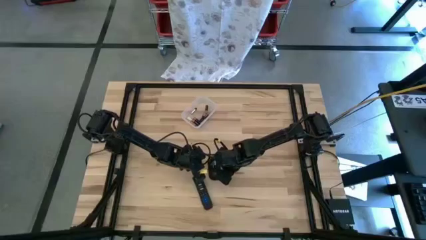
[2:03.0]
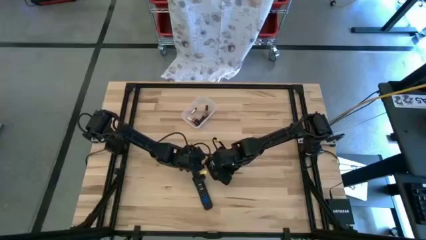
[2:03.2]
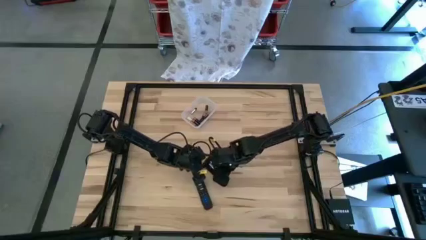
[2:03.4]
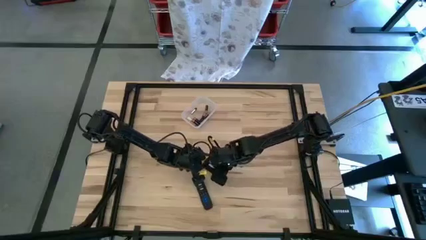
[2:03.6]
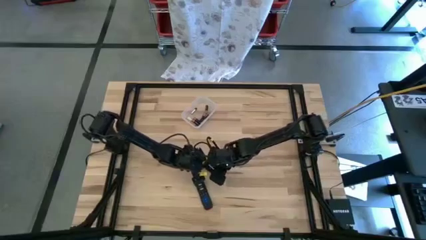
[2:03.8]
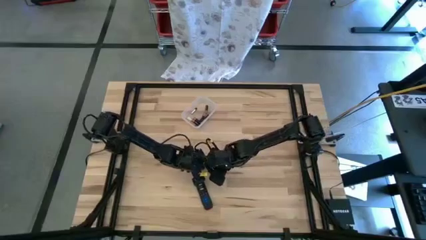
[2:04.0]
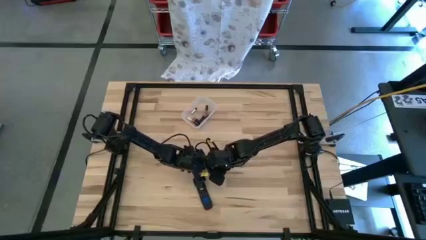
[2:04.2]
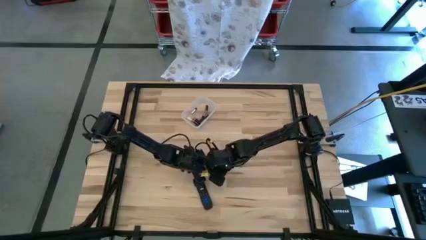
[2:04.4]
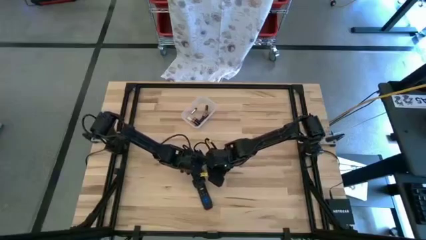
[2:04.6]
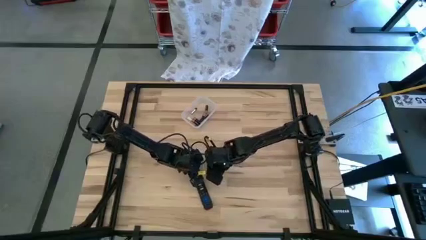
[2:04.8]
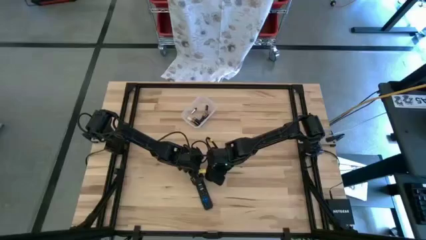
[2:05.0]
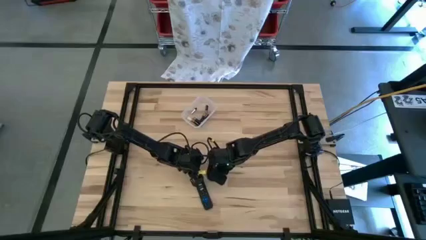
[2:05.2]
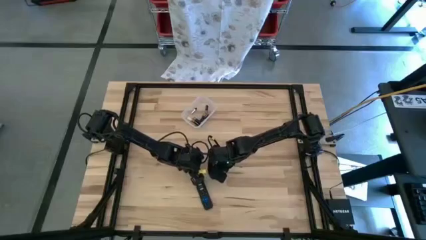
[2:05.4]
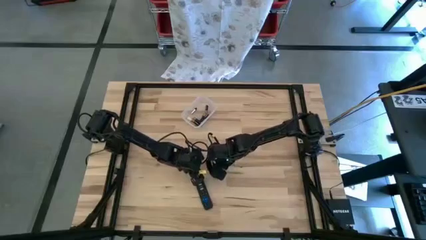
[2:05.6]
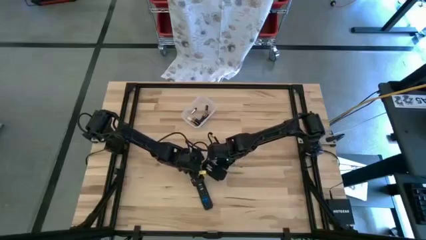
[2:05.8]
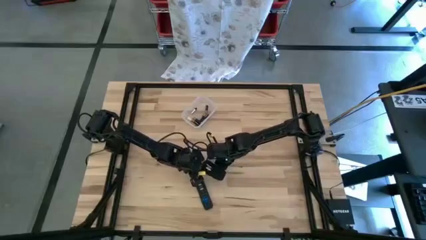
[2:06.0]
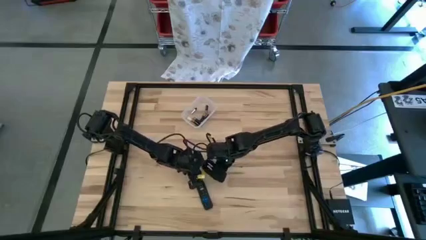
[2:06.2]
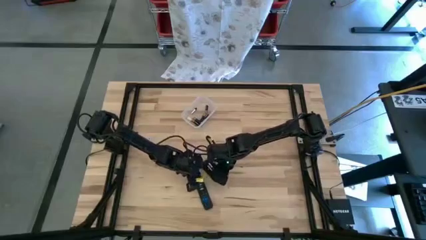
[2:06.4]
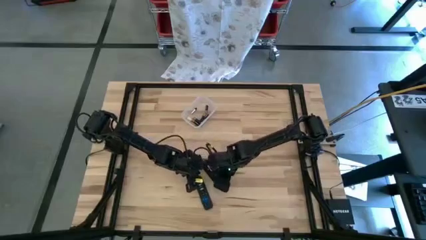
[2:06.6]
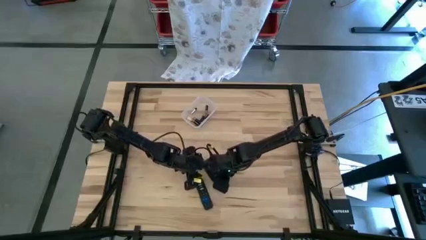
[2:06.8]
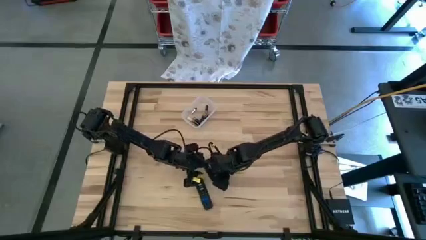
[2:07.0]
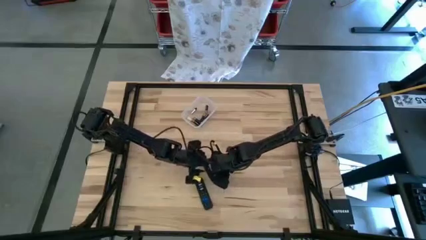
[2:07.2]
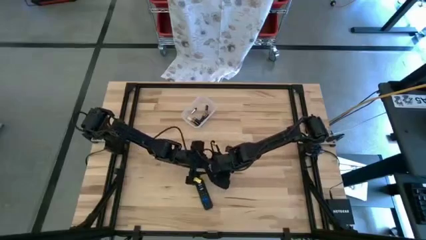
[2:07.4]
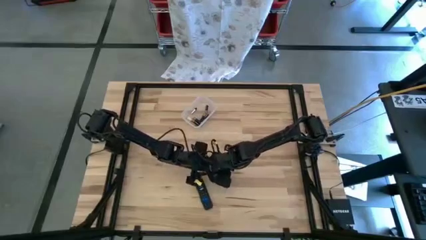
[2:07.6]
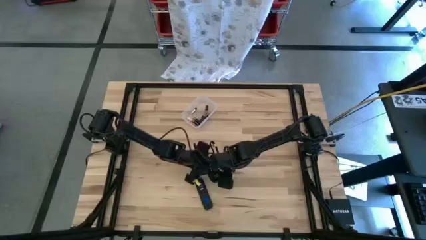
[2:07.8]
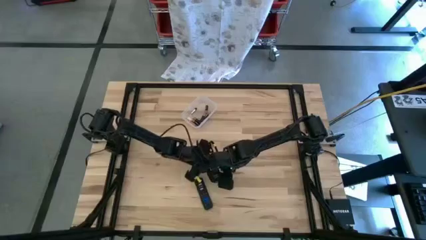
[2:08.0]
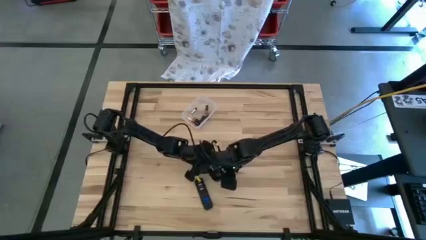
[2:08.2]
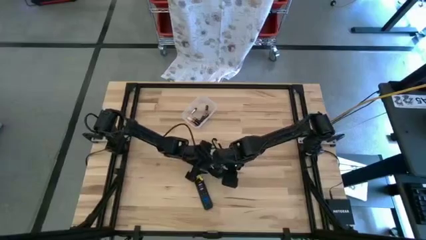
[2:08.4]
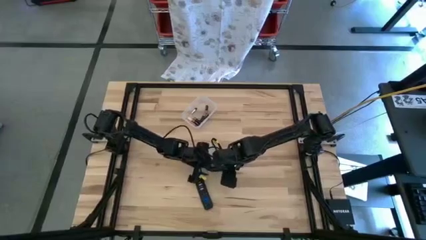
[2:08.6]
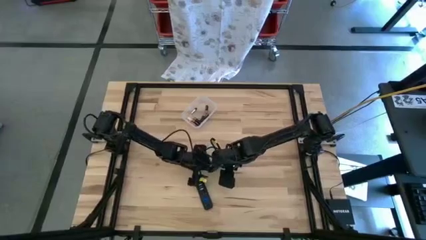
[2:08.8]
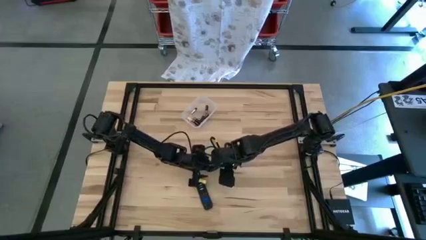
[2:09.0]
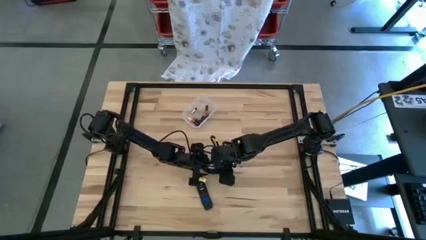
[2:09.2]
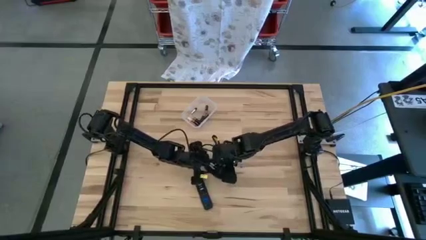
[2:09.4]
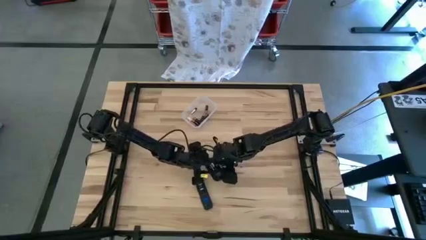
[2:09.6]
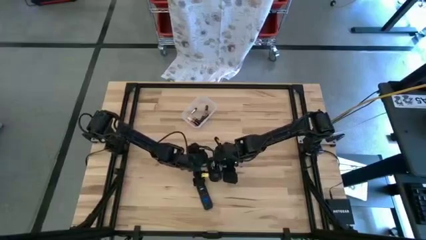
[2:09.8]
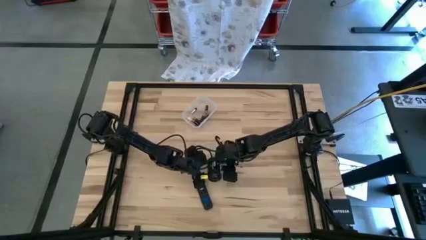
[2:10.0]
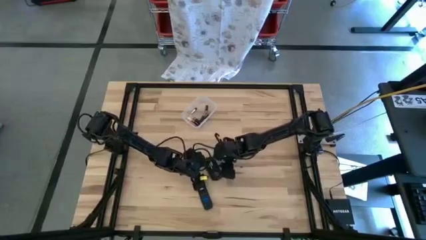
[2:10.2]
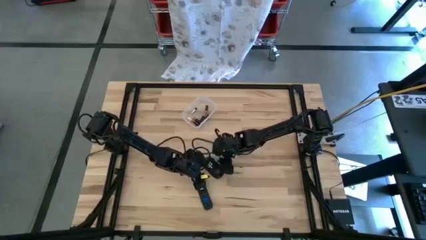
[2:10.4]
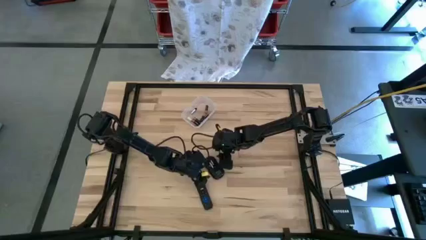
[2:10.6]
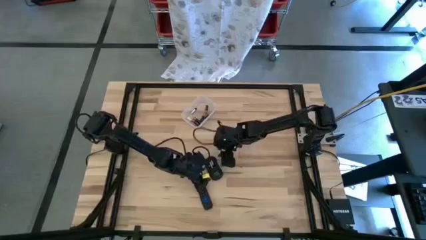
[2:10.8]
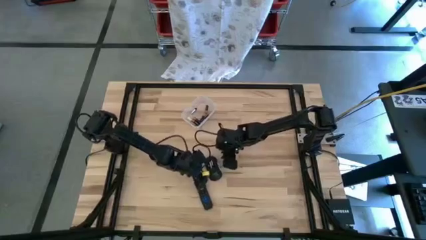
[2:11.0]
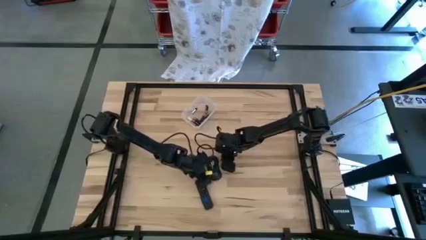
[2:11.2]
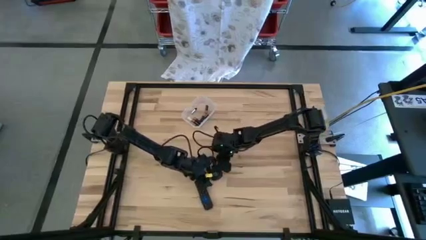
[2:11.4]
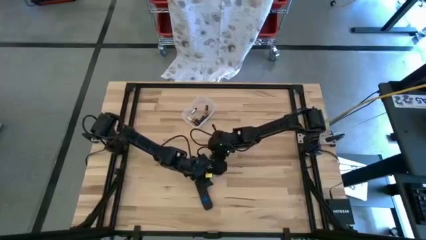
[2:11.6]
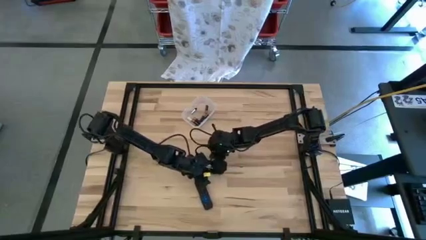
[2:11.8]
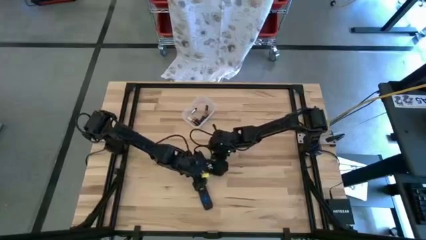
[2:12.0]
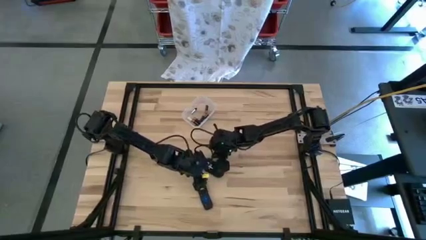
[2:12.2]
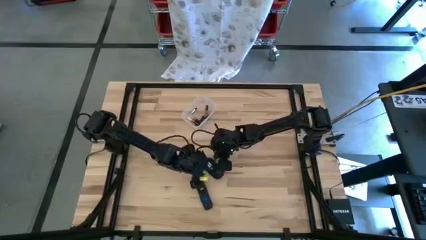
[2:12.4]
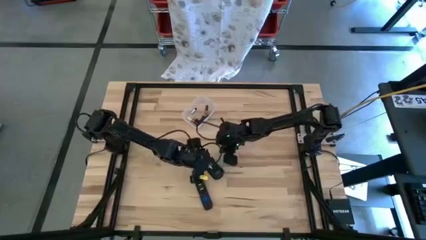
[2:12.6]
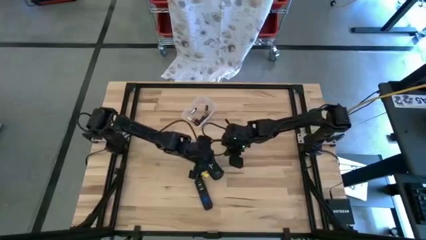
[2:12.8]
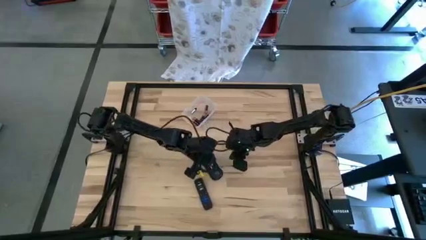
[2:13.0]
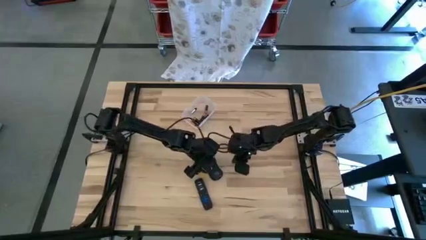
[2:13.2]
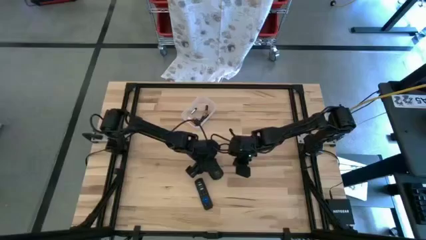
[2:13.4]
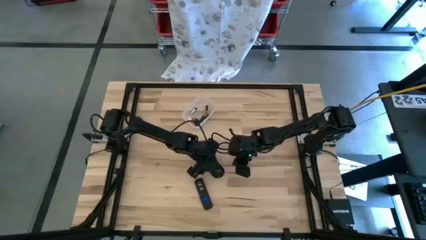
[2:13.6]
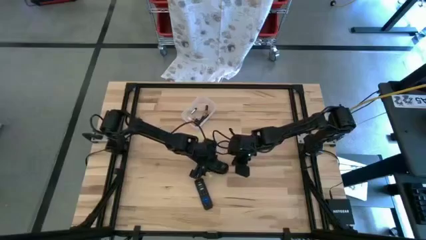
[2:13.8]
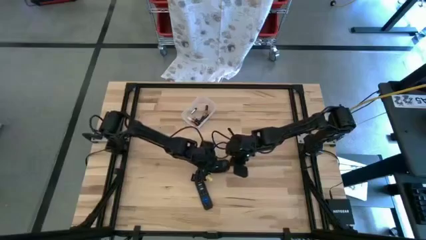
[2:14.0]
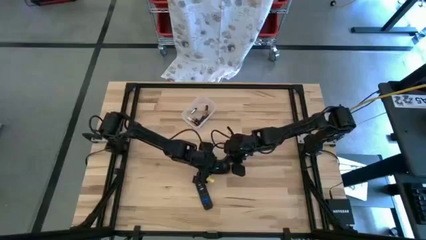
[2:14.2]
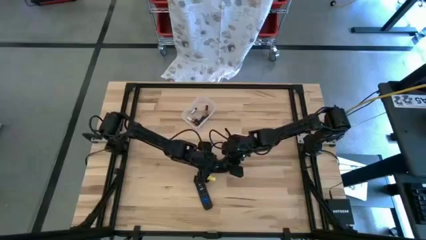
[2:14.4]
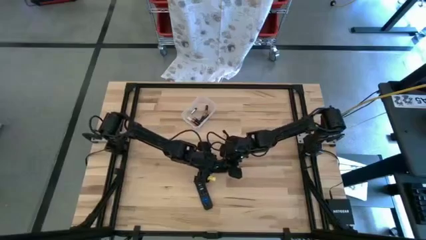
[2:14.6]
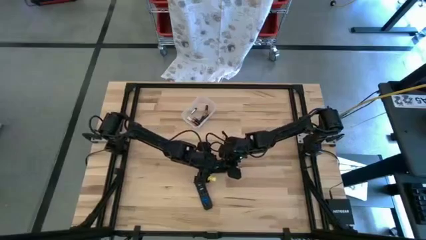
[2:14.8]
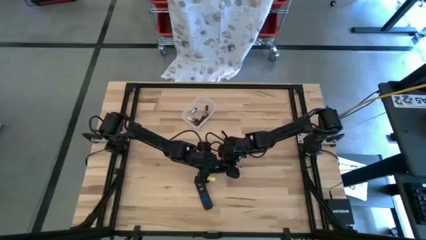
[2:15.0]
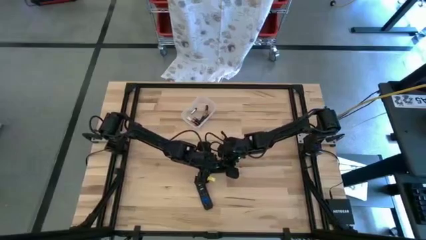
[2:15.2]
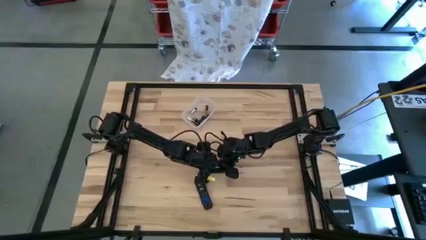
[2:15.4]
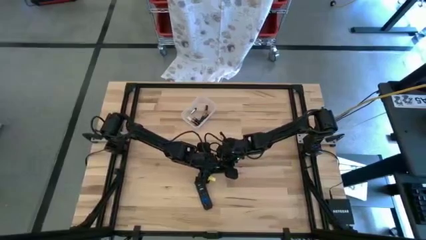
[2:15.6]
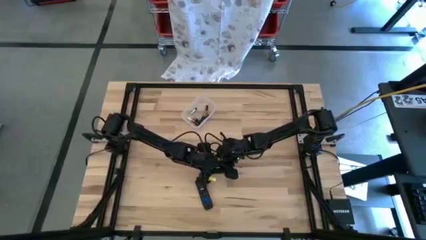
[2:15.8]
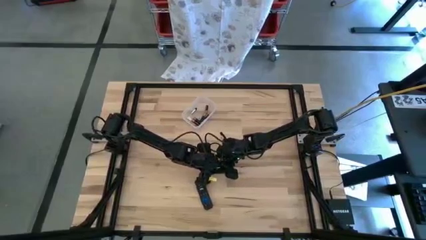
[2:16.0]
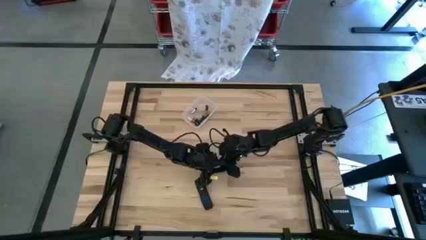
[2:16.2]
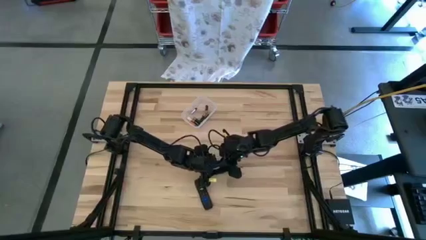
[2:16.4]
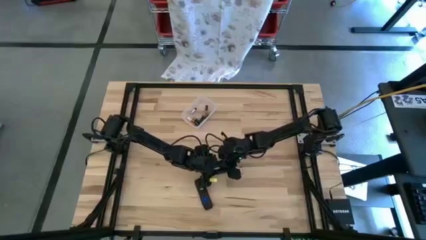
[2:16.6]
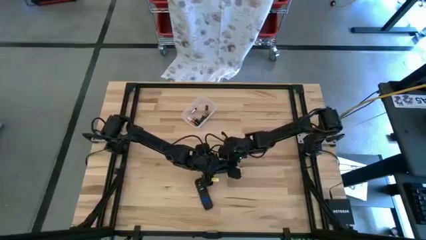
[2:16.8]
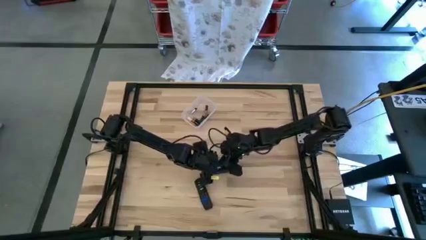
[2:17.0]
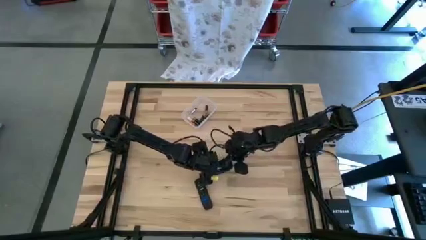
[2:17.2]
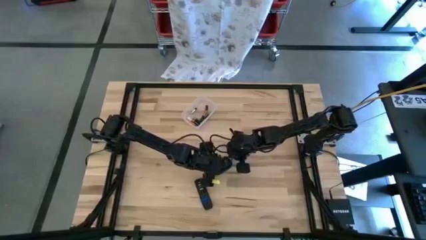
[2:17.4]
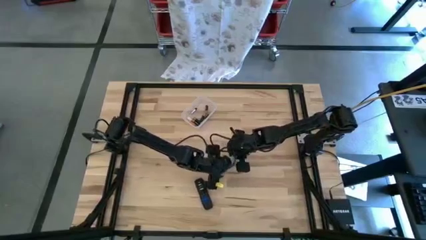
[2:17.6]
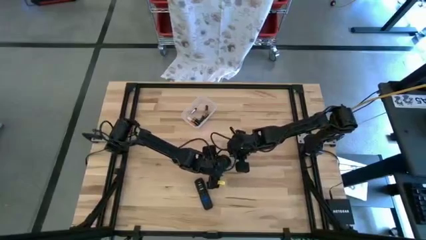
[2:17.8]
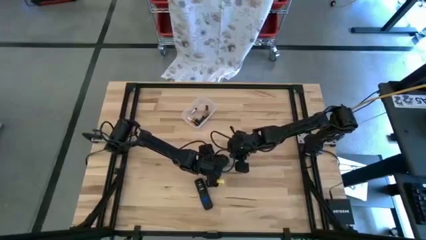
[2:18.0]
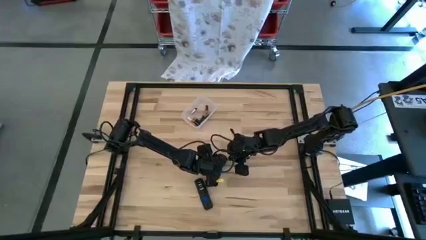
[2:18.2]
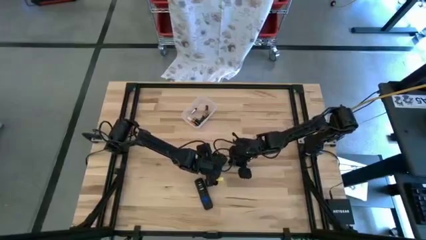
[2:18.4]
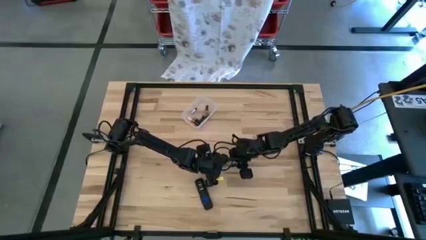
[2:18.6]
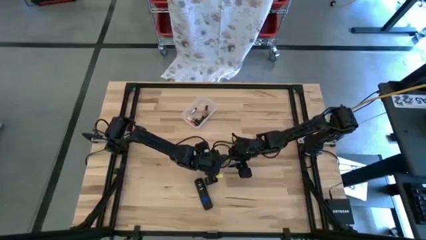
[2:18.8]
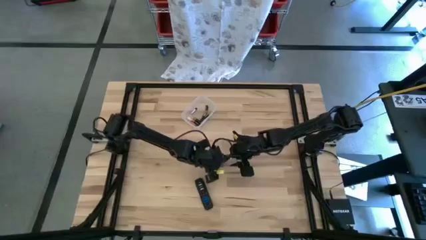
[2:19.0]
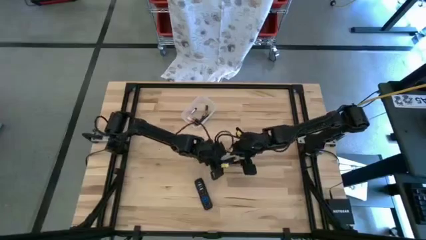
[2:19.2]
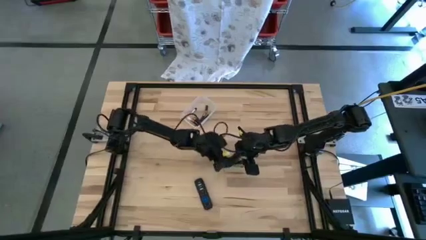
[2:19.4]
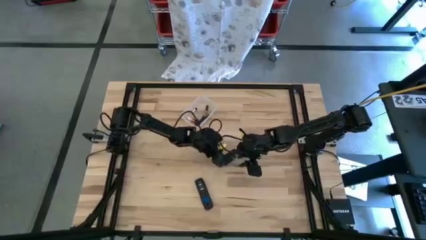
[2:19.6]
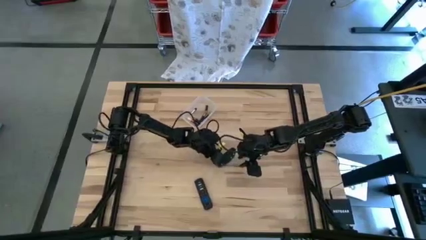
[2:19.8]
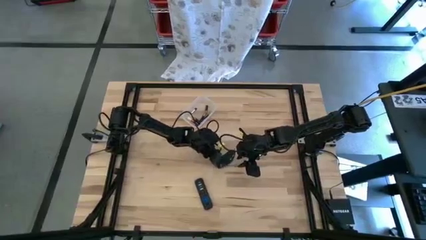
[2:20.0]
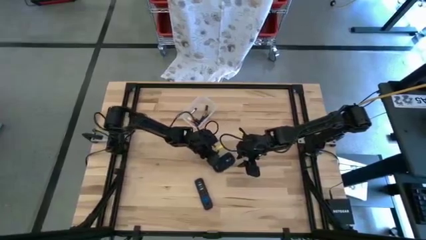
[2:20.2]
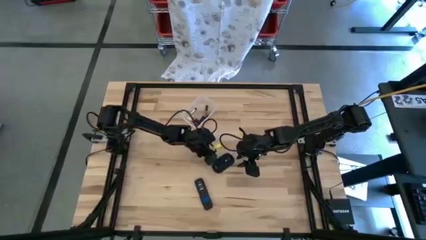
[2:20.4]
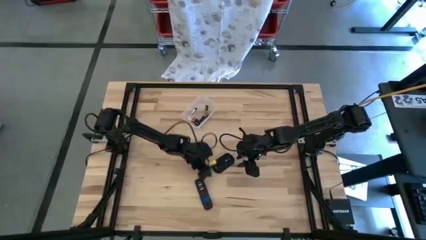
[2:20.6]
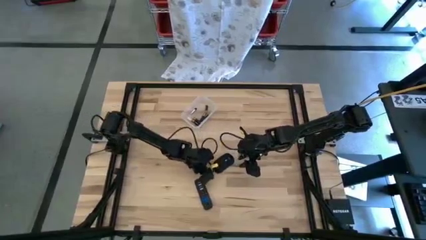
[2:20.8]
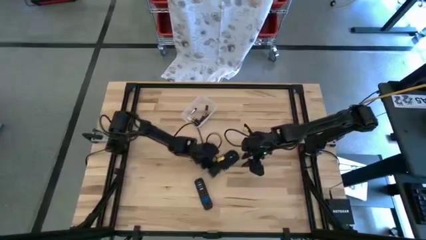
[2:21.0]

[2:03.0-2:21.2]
Task: Insert battery
Insert the silver battery into the mouse
